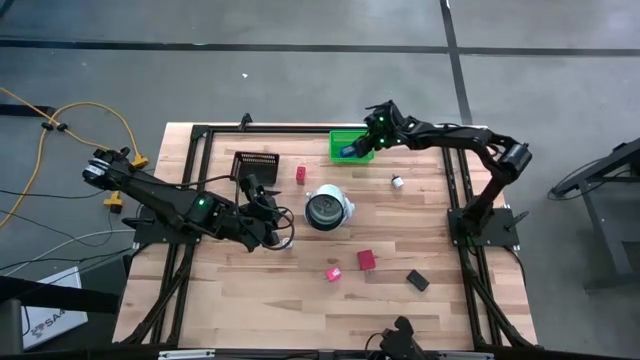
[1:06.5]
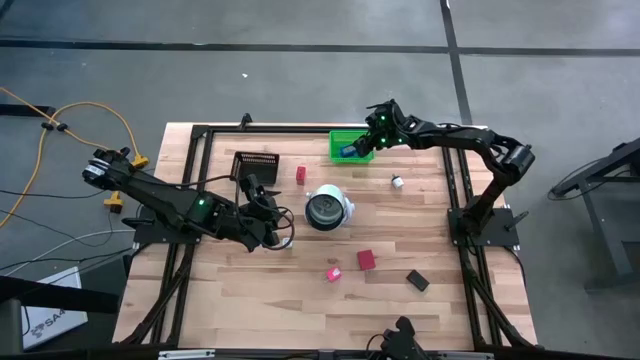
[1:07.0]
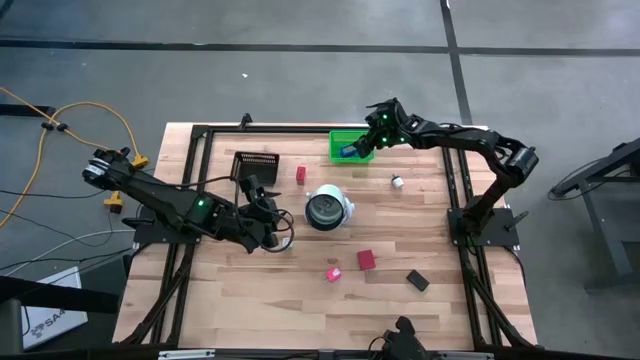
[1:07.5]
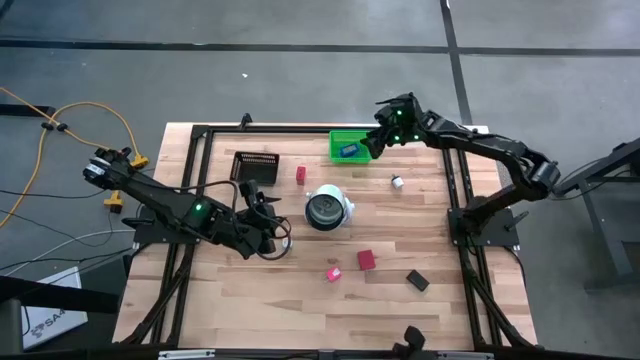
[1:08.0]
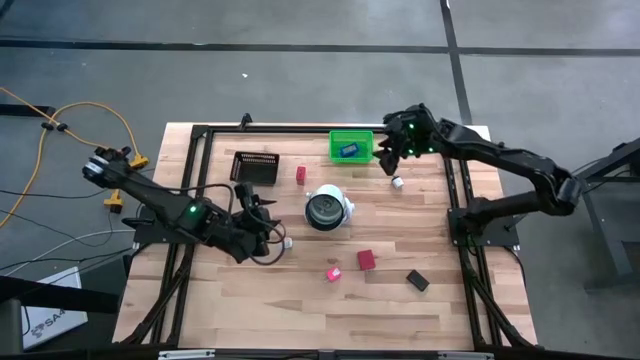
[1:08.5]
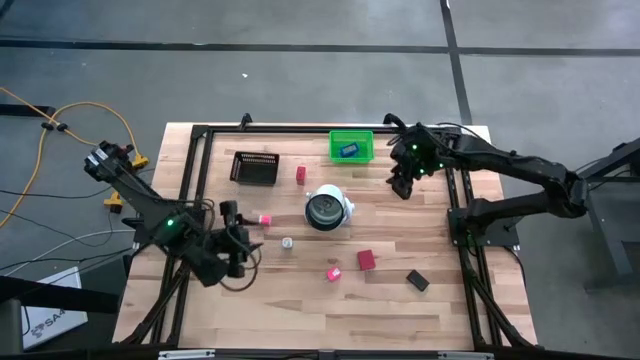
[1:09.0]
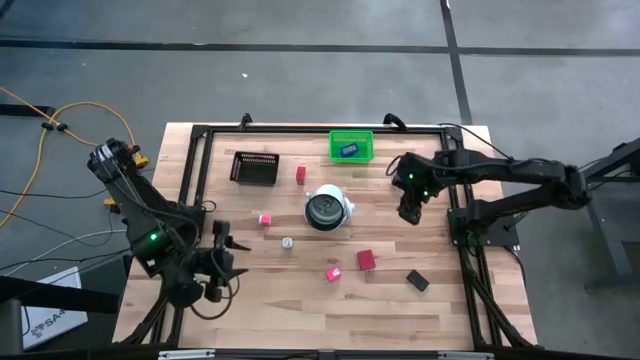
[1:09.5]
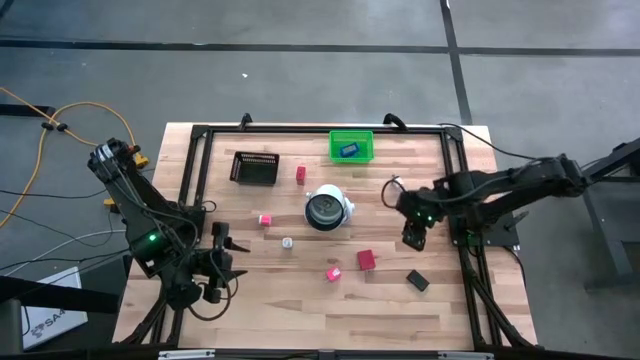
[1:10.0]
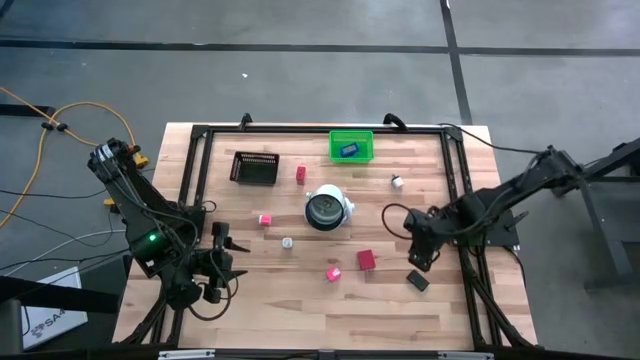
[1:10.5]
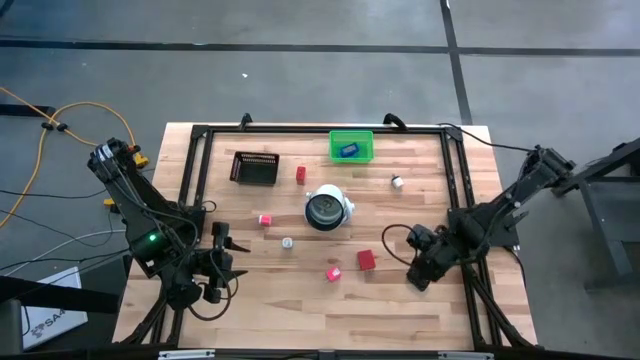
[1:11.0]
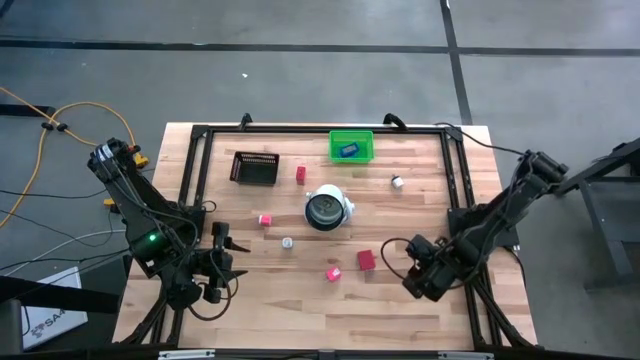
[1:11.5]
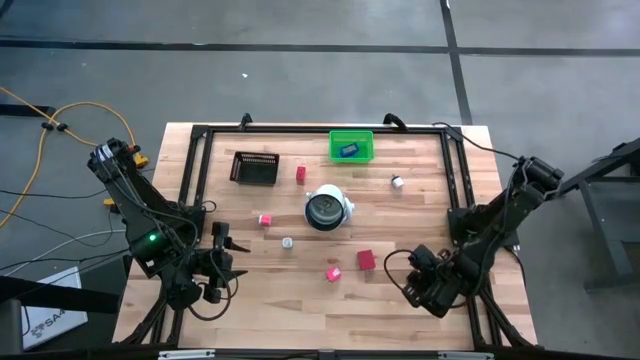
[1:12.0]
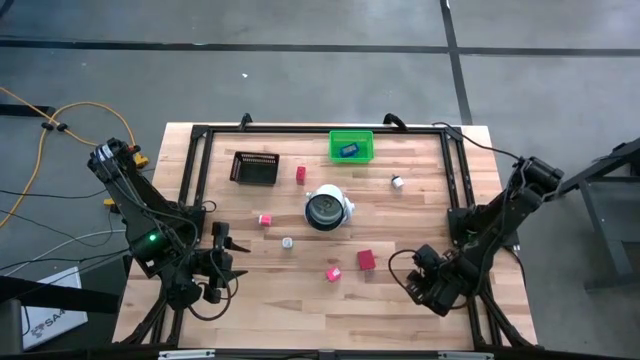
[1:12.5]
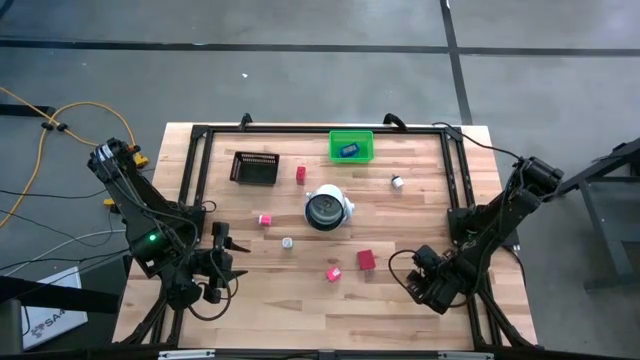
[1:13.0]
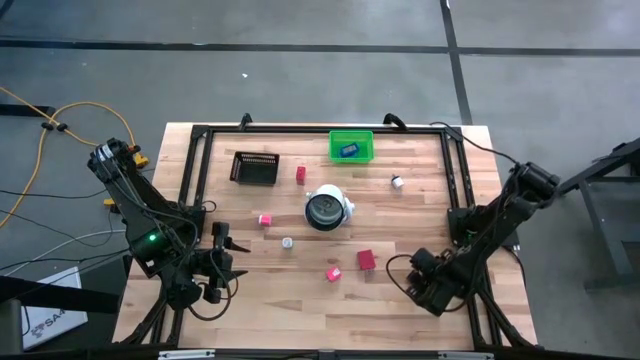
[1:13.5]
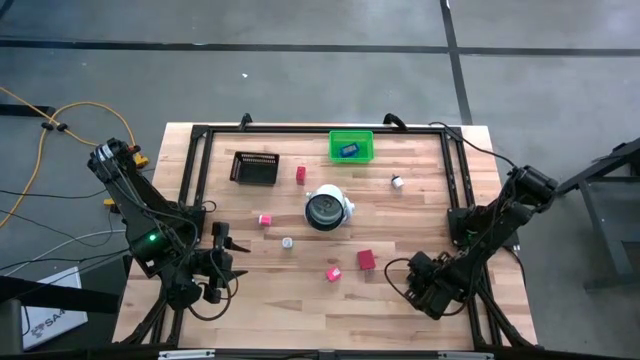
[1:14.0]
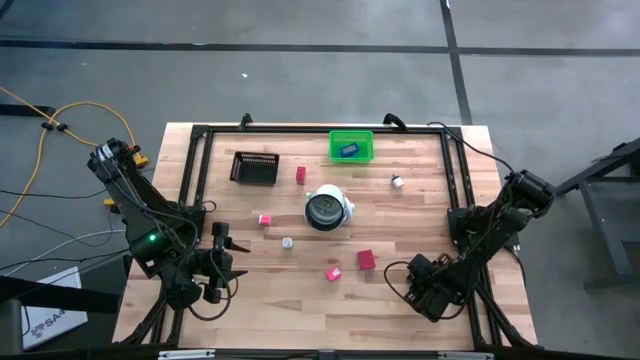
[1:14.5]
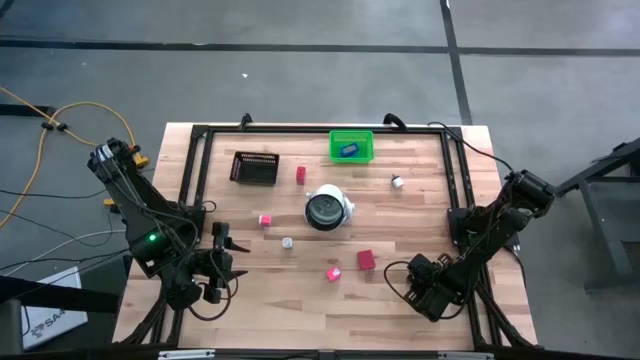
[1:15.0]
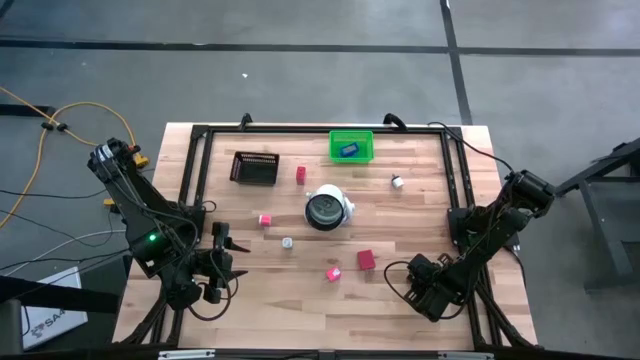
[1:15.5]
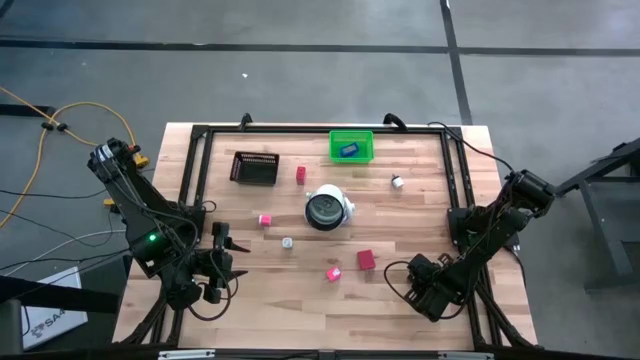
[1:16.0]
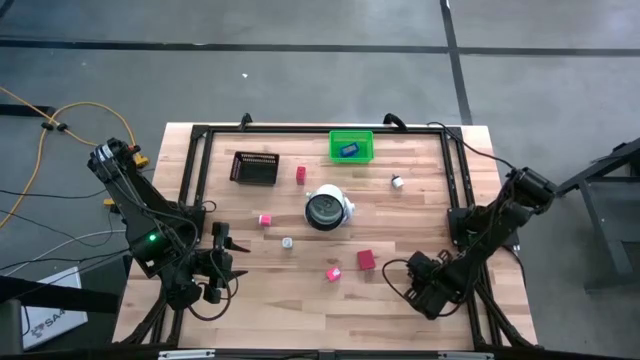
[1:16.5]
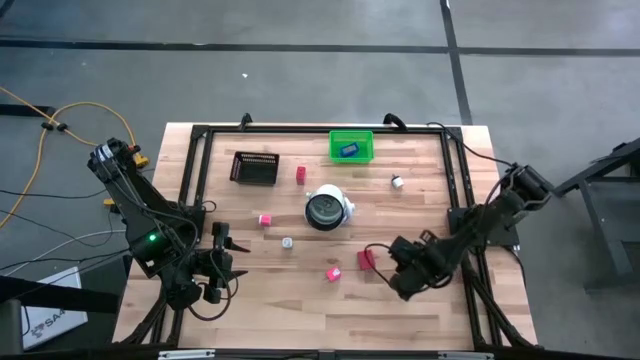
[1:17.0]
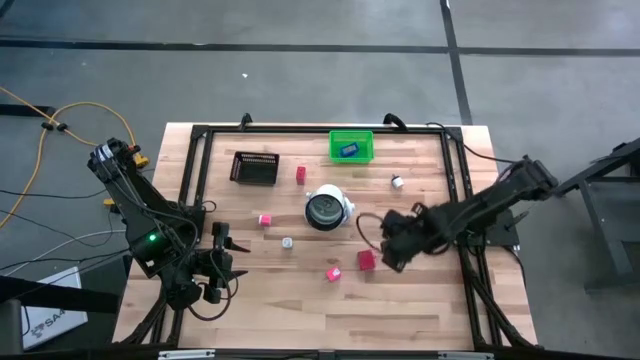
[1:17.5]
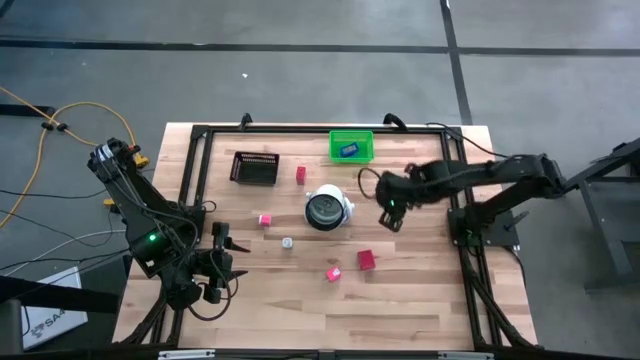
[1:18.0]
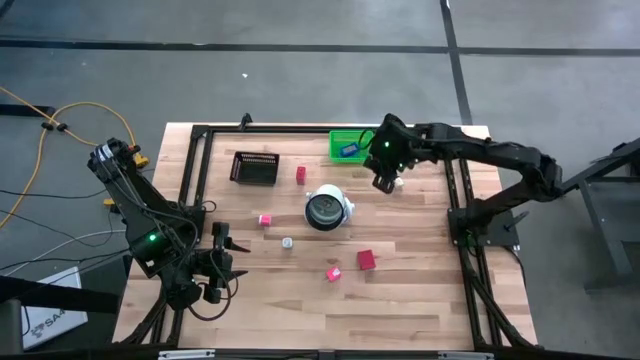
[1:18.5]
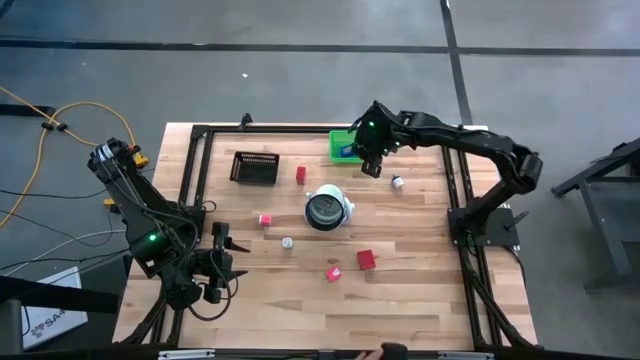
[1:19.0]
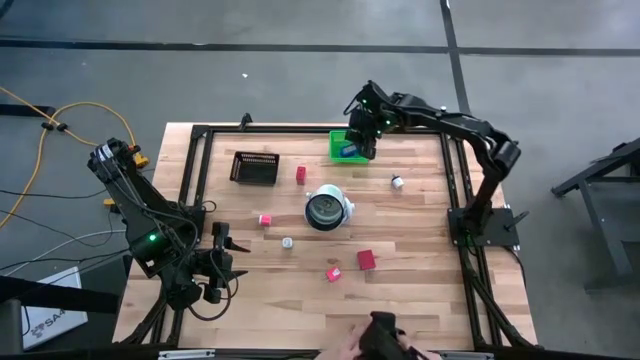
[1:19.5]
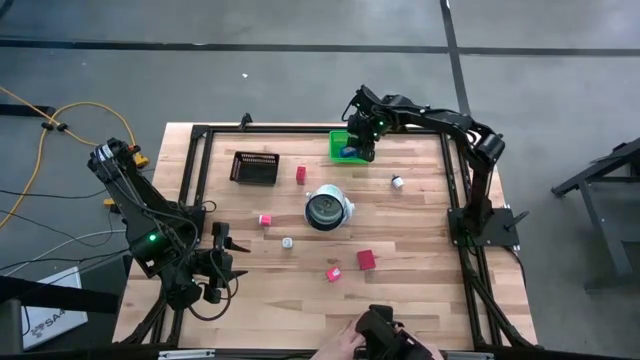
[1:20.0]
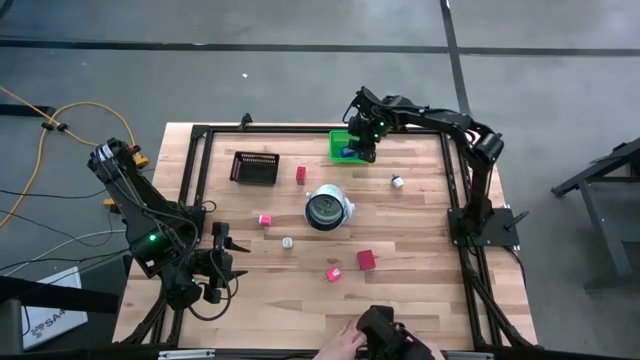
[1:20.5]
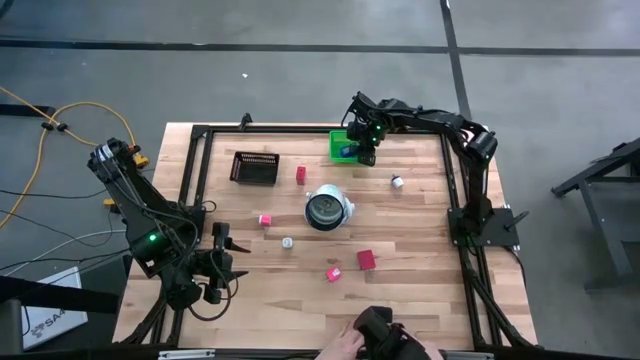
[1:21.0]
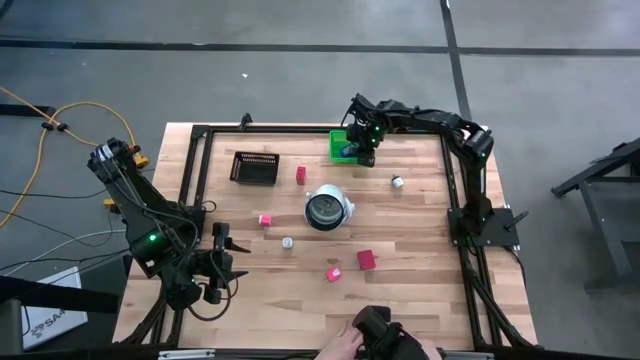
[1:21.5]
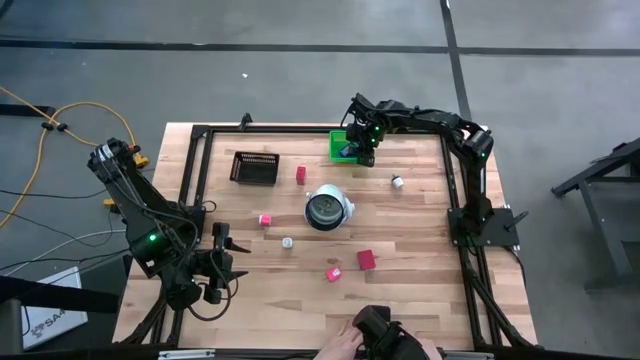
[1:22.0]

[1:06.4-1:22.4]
Task: Pick & Place Office items
Put the black digital timer into the green bin

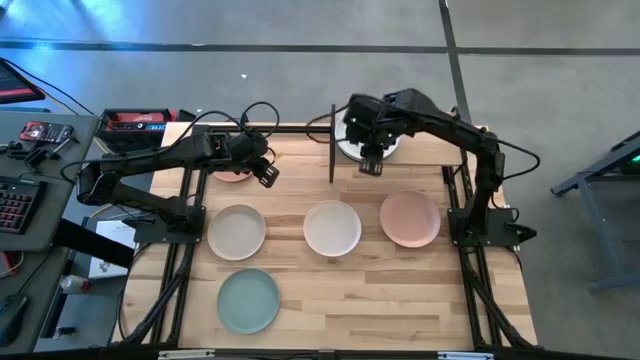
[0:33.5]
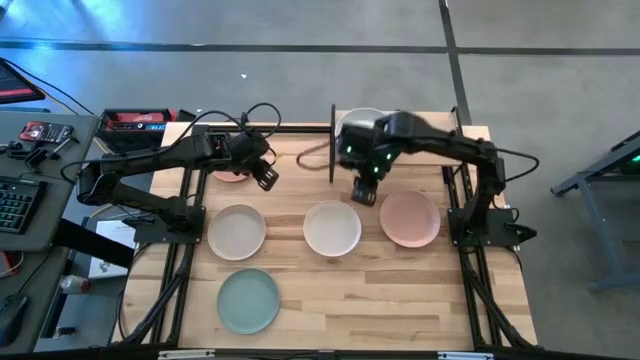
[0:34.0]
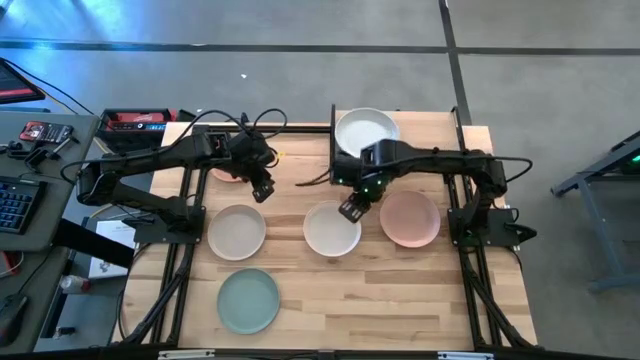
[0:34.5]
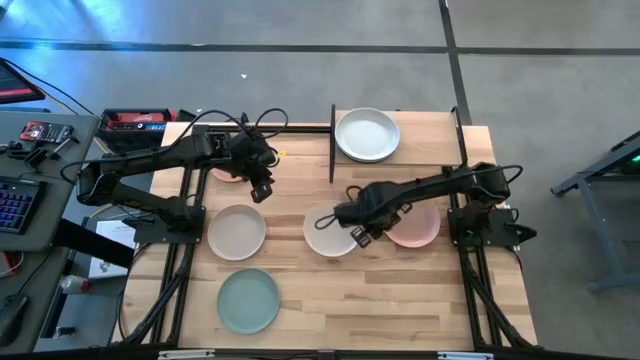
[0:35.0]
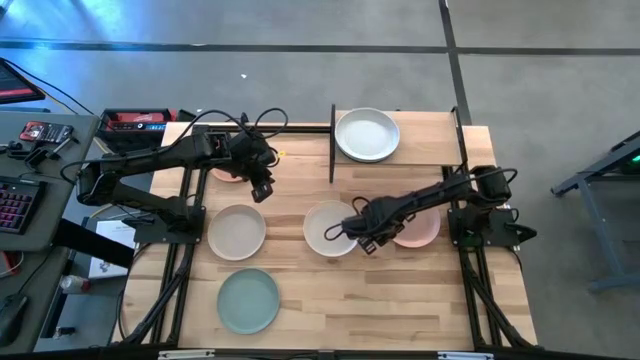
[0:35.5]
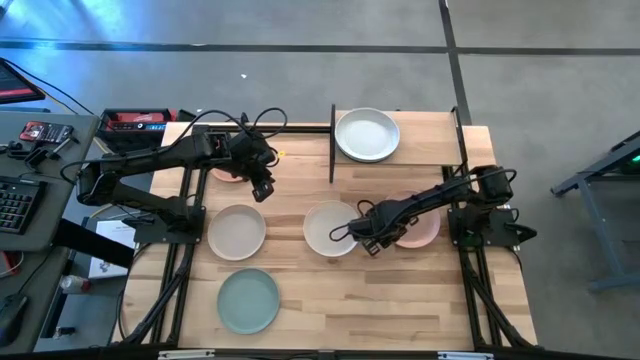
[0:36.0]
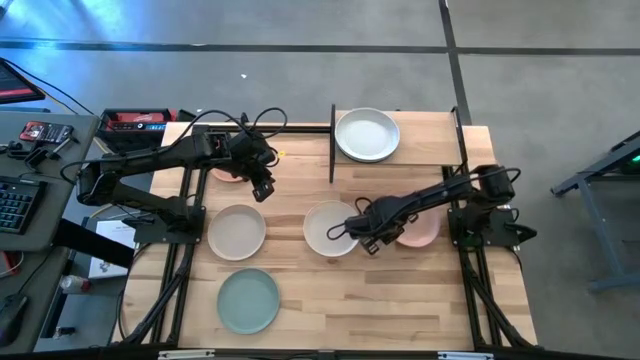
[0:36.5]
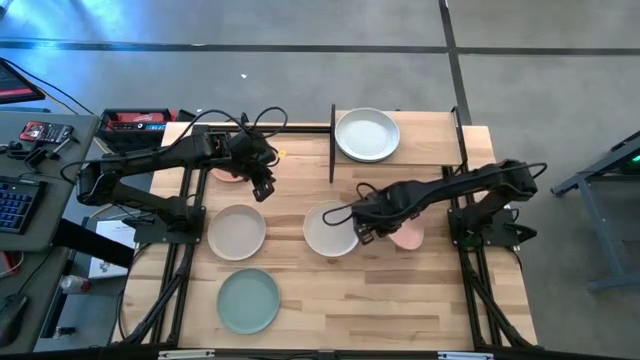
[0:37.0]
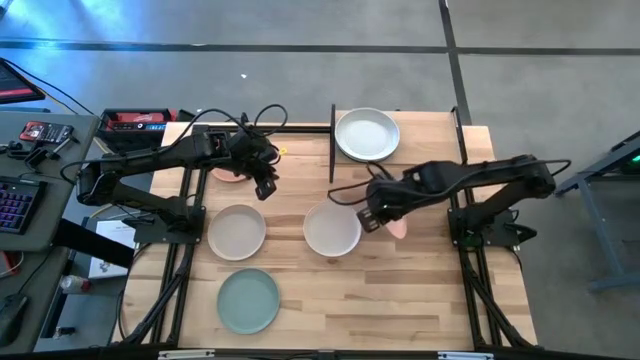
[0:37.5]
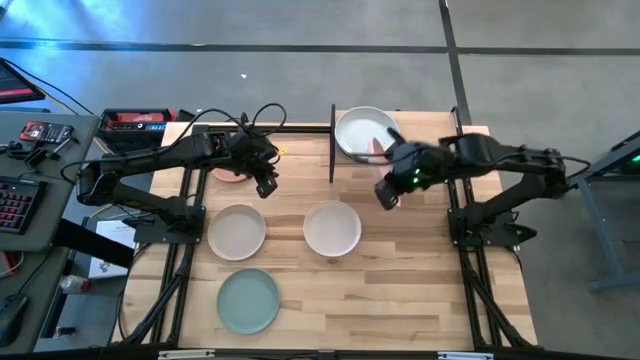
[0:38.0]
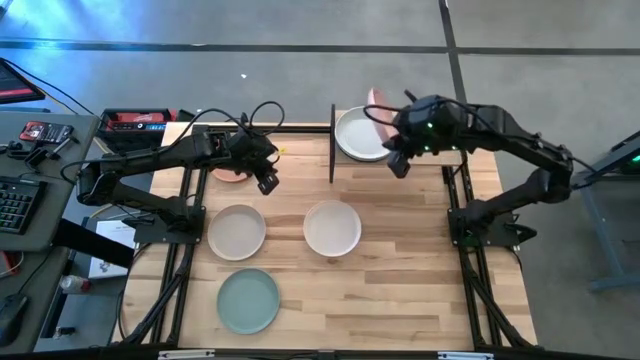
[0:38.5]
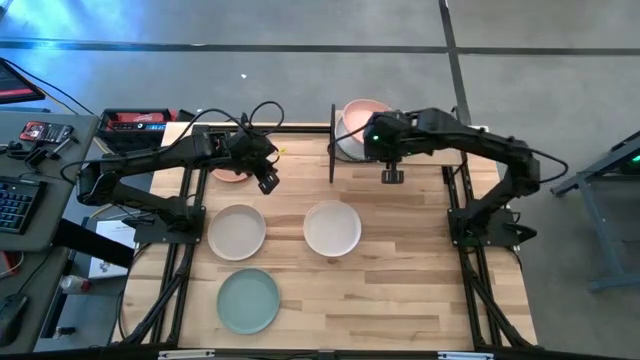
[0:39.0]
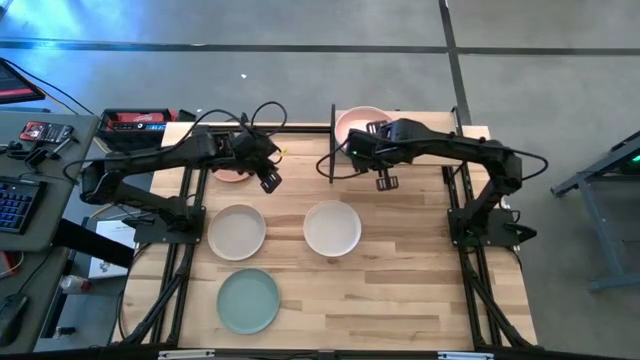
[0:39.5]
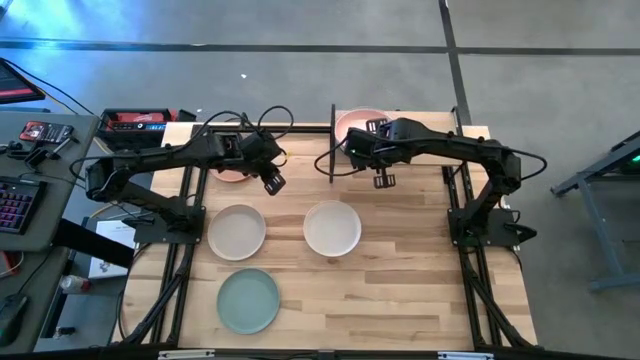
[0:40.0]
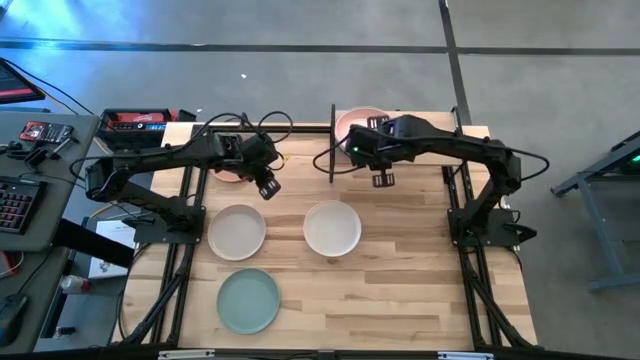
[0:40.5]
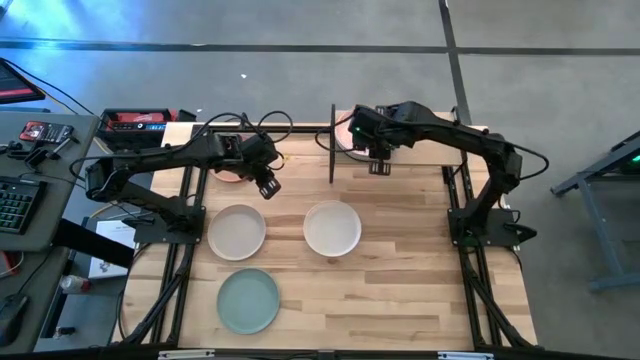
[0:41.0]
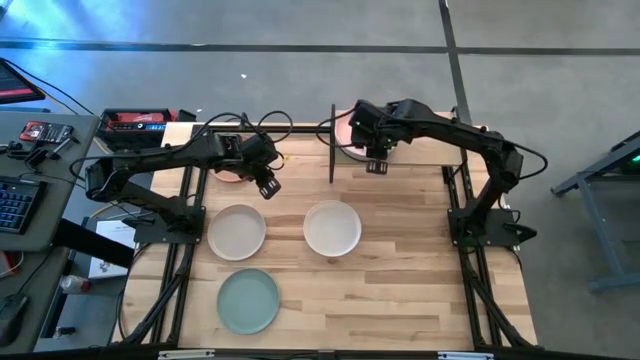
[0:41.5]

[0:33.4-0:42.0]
Task: Place and stack plates onto a shelf
Stack the light pink plate on top of the white plate on the shelf
